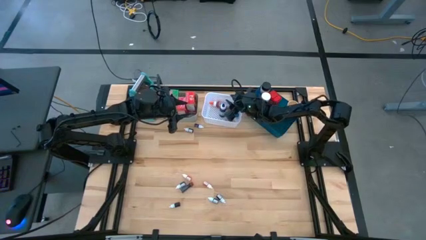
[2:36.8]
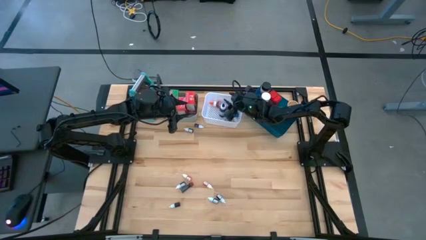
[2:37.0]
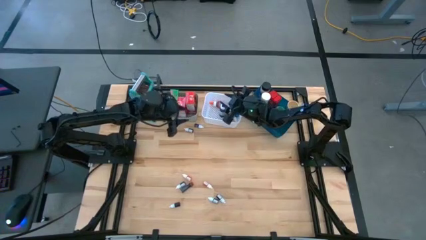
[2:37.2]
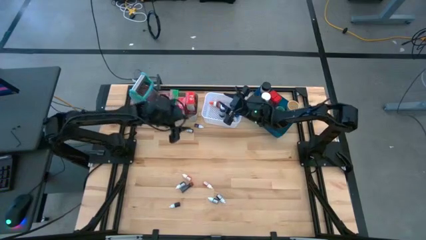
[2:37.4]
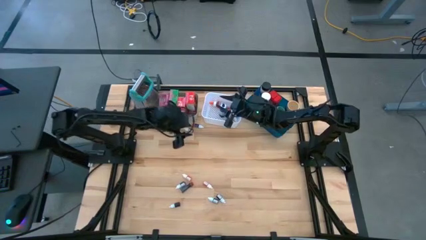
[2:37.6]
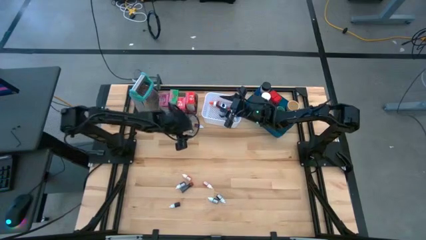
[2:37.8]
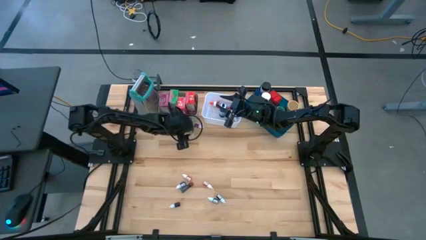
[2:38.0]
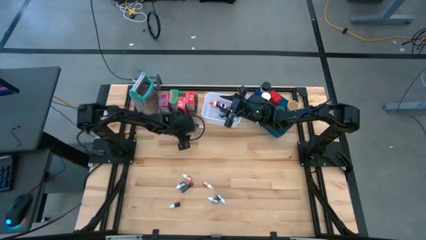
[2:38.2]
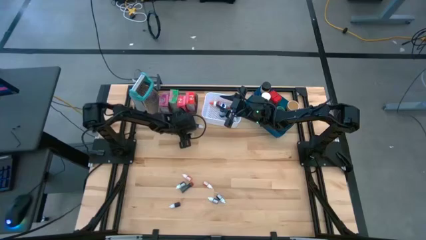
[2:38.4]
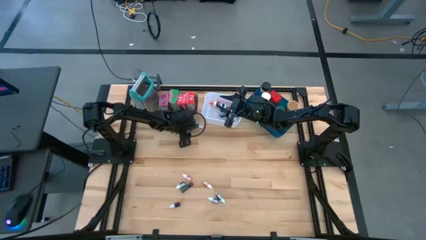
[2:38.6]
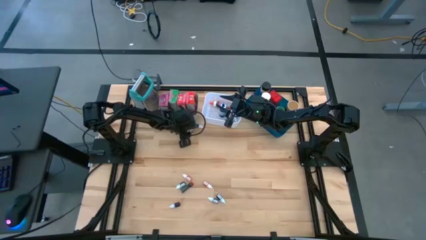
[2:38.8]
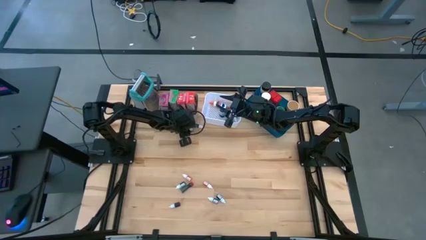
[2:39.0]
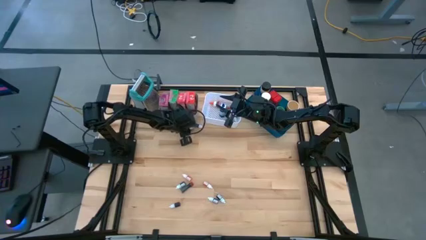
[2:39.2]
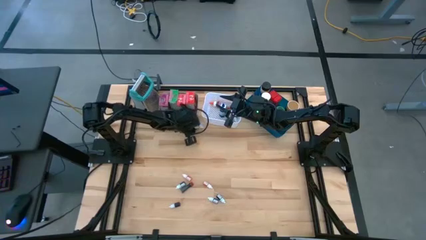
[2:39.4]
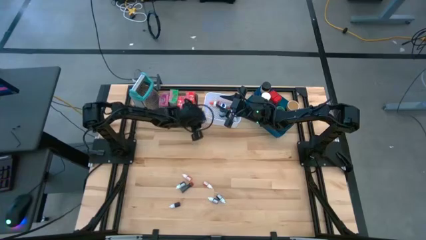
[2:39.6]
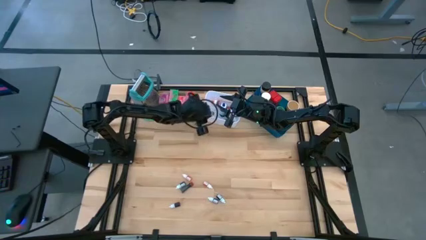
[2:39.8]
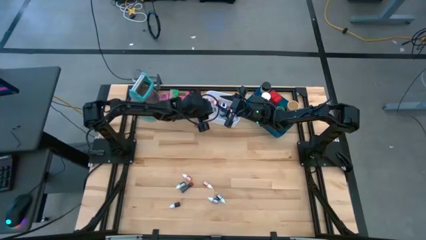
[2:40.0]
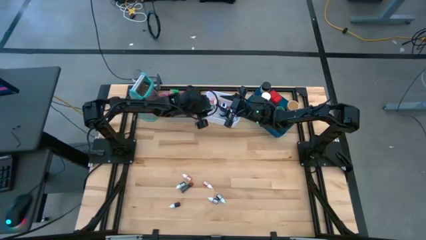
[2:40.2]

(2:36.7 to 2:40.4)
Task: Pick & Place Kitchen Items
Put the top small green food coloring bottle into the white bin

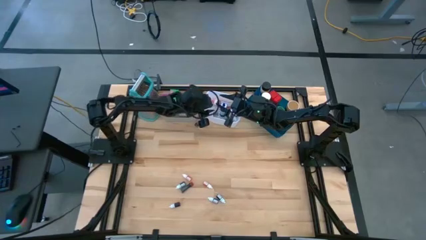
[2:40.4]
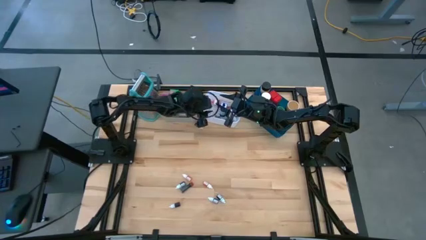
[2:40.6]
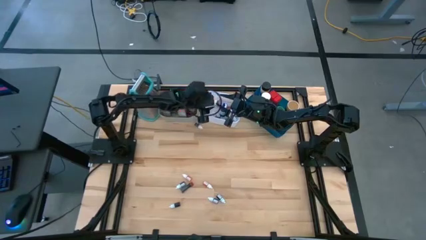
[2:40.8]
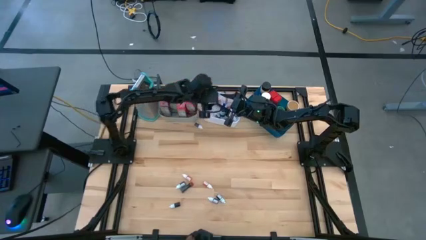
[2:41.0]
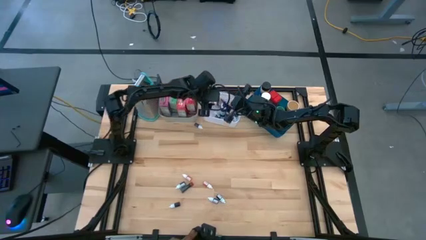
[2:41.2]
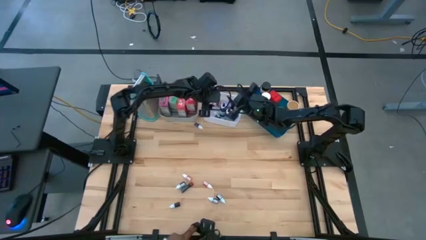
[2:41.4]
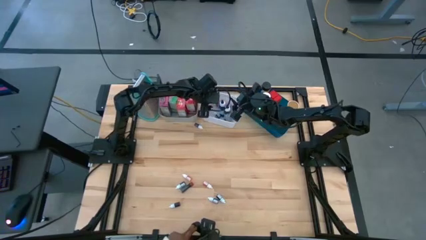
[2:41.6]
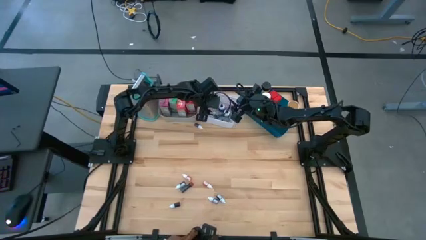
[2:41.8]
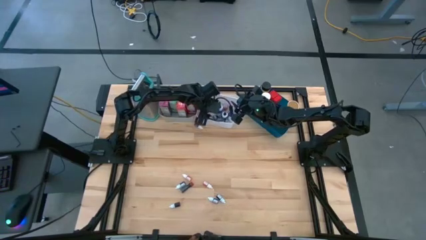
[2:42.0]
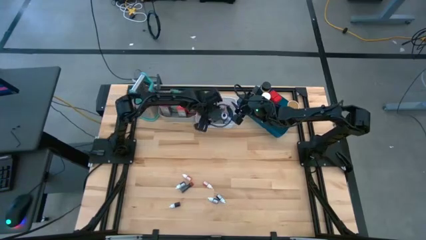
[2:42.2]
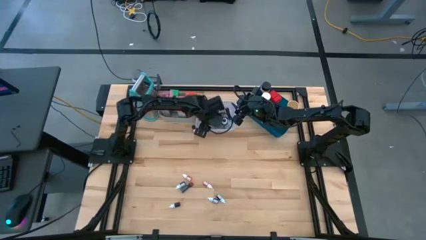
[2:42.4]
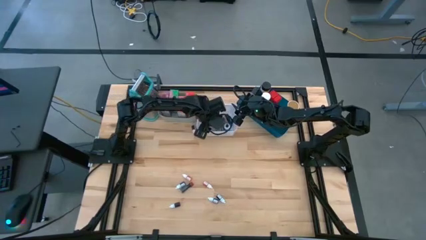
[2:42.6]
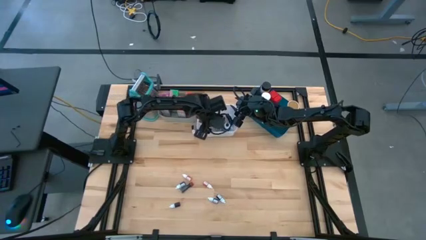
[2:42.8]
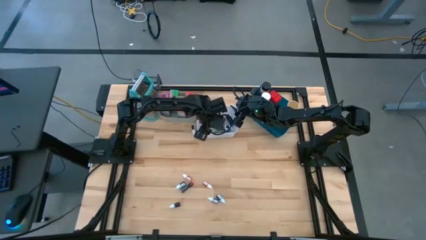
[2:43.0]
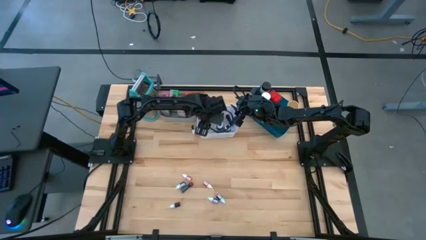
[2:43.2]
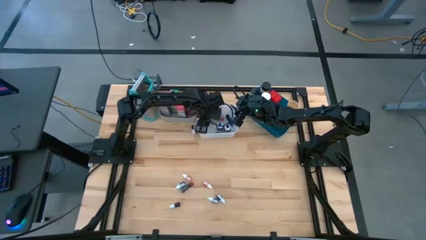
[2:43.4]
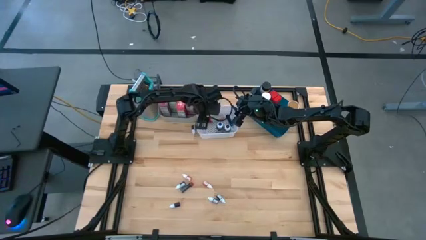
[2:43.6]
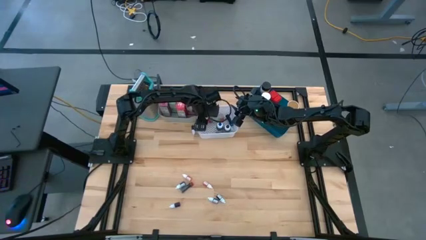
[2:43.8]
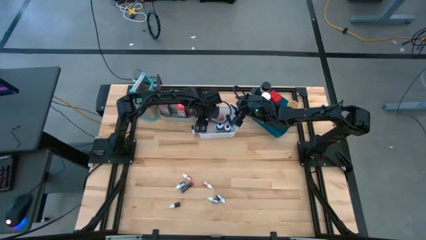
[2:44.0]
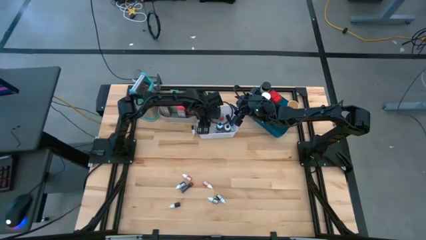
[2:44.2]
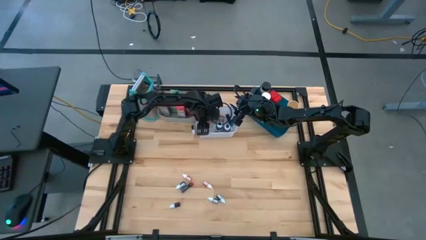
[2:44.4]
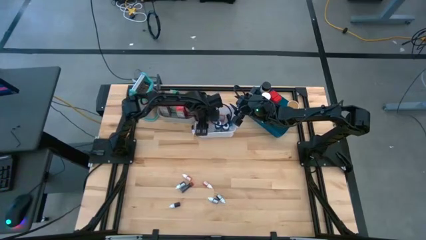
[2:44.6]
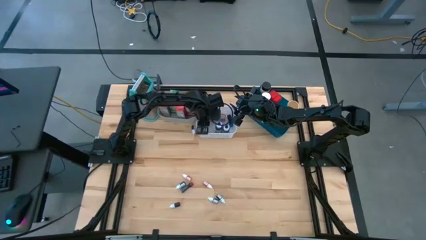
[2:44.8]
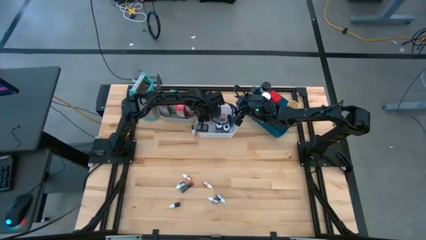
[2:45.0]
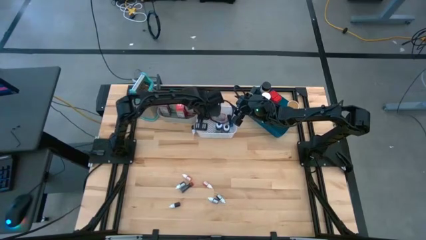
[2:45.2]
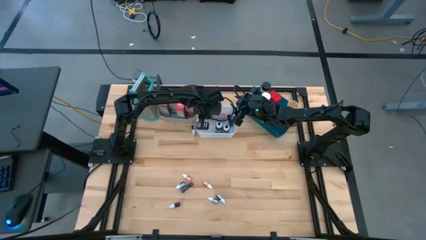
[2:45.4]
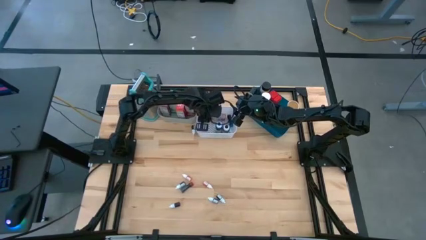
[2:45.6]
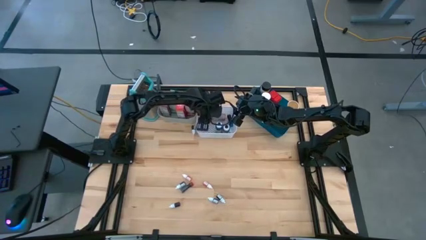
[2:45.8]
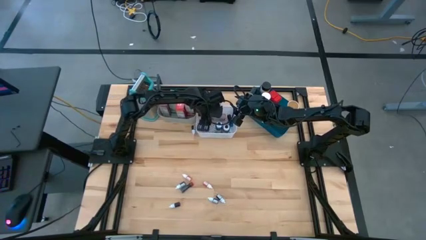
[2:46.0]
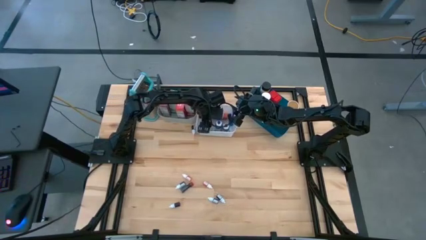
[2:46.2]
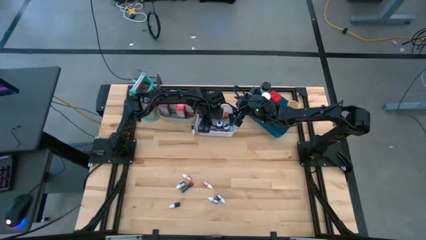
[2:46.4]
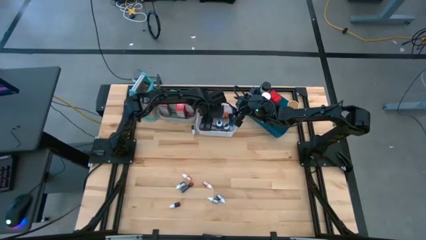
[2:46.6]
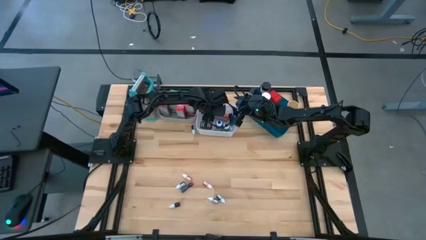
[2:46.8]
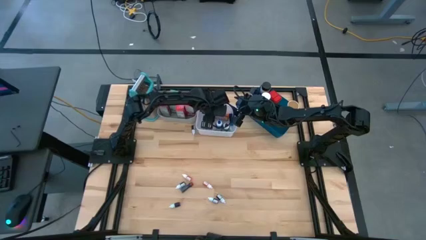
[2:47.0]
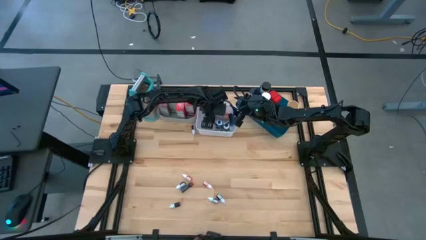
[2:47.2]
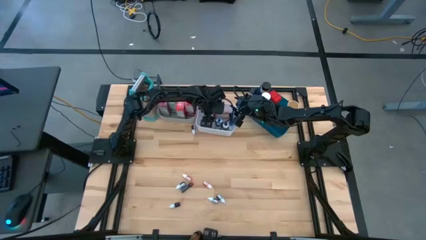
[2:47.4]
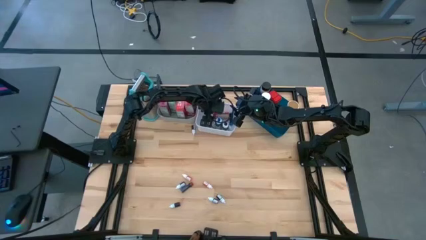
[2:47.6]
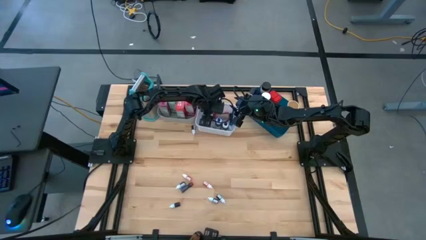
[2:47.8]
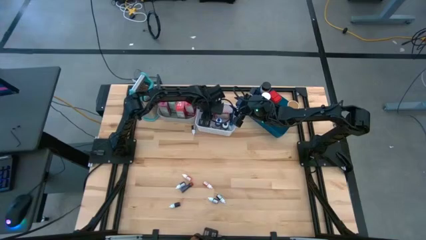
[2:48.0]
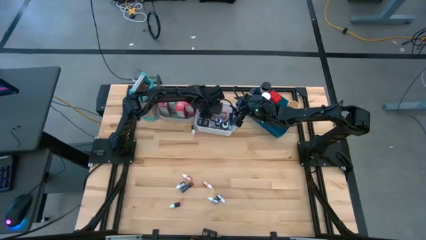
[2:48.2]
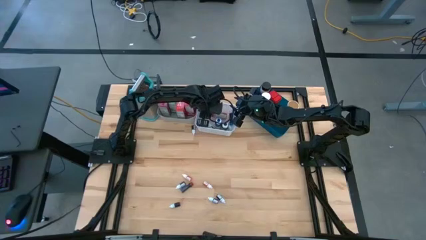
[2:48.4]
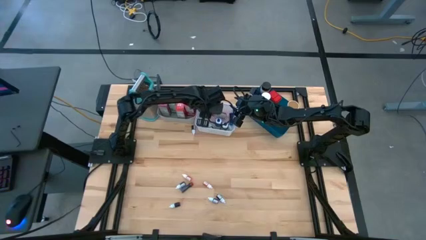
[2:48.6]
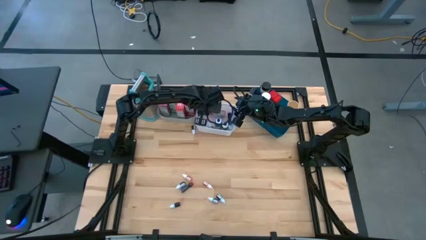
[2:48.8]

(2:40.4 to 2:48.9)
Adjust the large orange food coloring bottle into the white bin

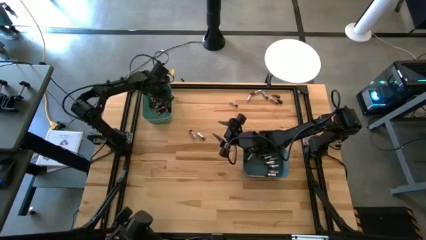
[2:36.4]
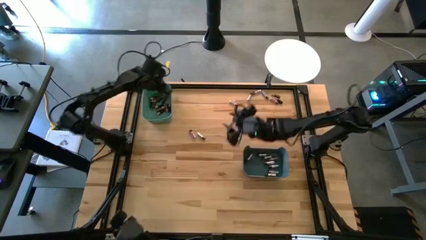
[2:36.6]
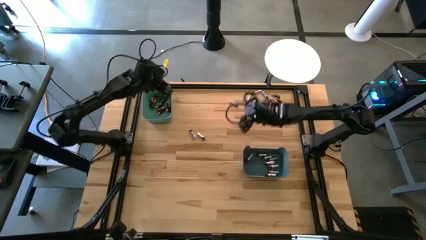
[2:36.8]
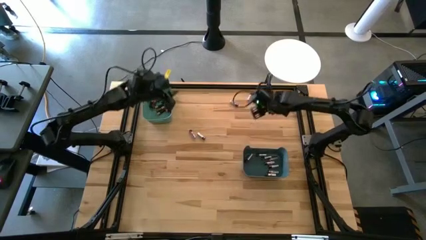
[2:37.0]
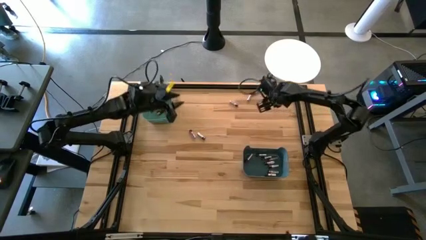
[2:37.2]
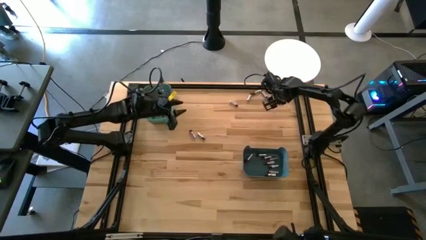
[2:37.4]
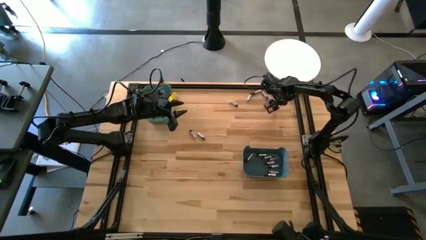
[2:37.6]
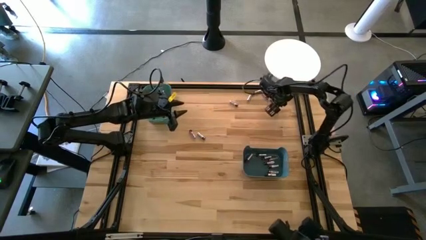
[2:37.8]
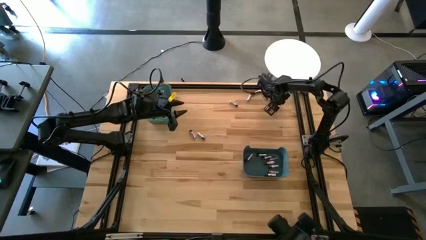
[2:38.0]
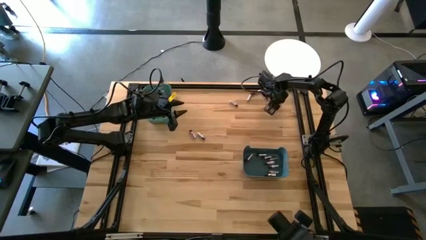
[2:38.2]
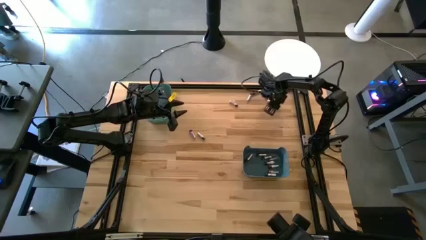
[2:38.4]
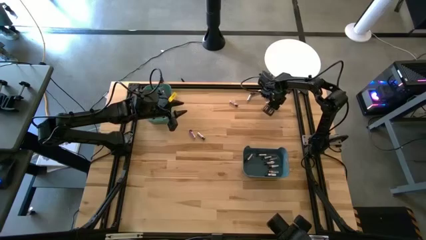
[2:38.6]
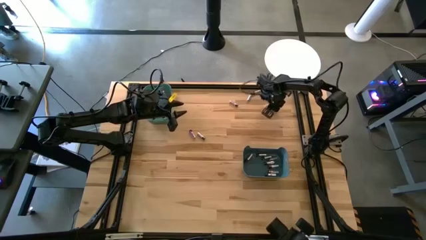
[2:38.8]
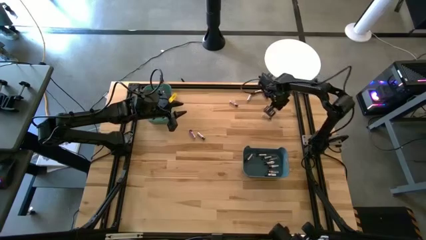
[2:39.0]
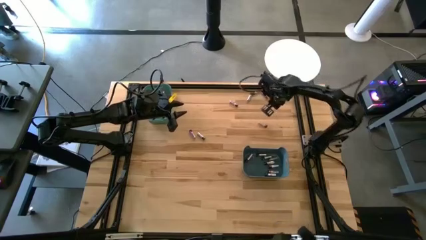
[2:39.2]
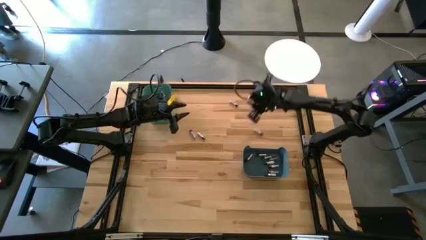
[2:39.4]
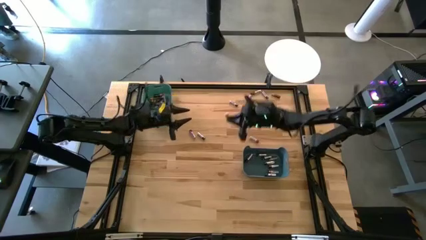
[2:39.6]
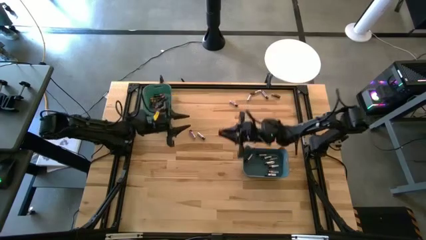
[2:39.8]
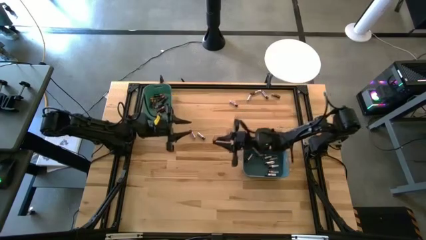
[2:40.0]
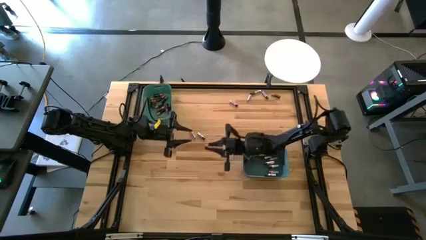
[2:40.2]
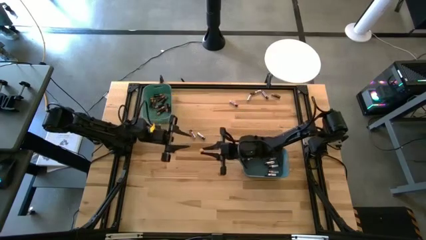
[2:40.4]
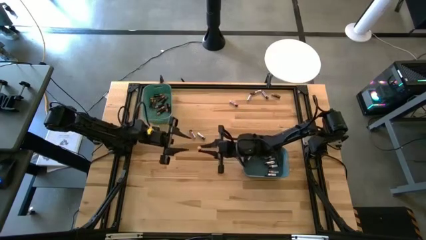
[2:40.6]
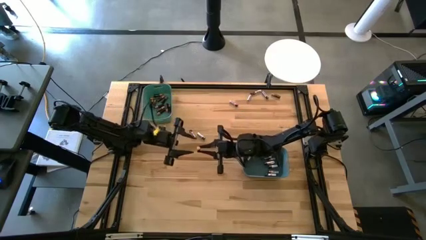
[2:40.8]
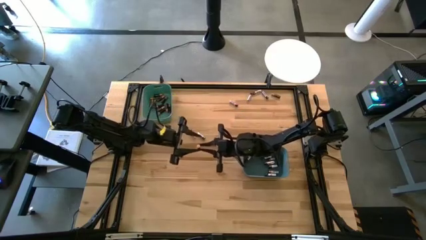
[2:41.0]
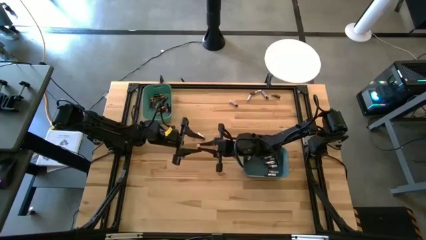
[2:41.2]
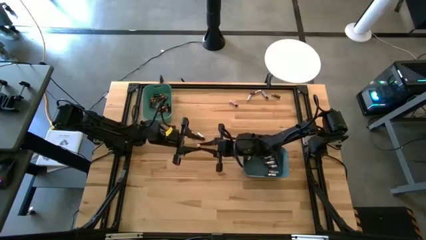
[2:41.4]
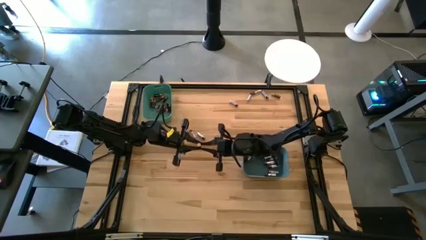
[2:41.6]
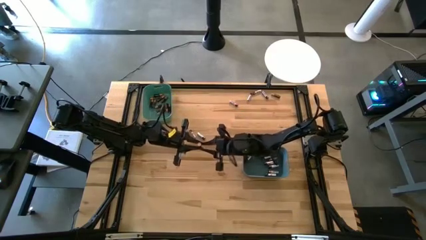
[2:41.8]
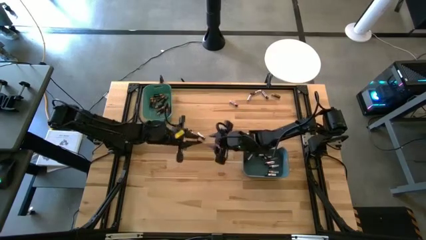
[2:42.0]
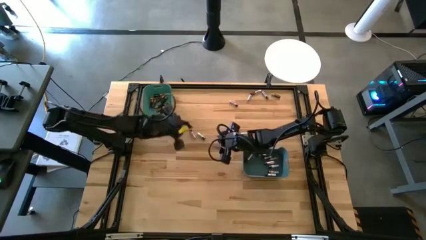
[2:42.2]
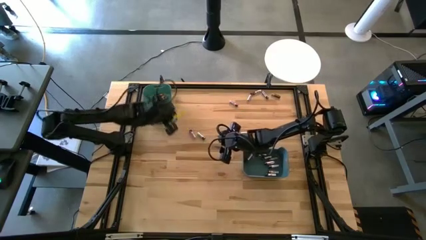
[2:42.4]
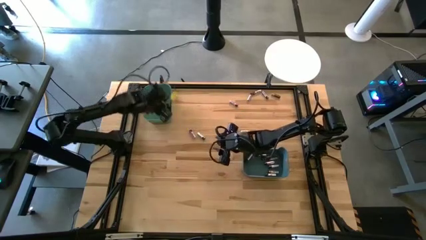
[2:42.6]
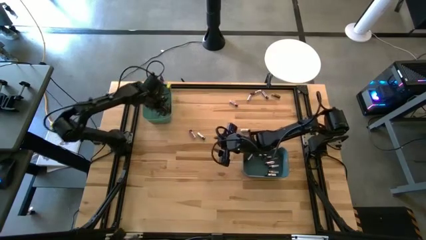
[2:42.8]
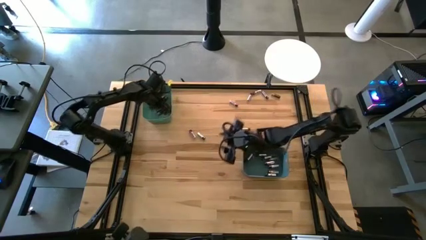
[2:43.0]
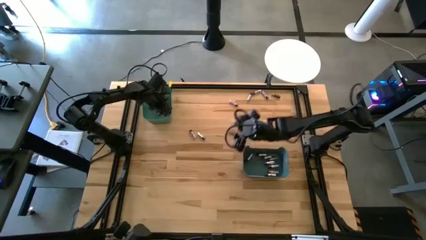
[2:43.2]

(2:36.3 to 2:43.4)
Task: Sort batteries
Put the black battery into the green bin
